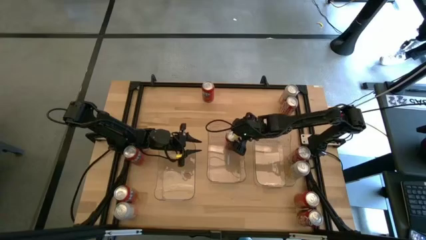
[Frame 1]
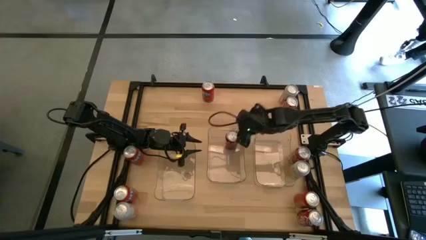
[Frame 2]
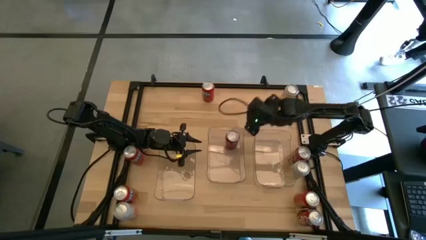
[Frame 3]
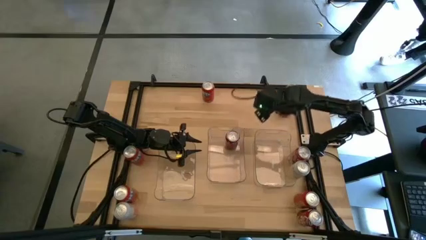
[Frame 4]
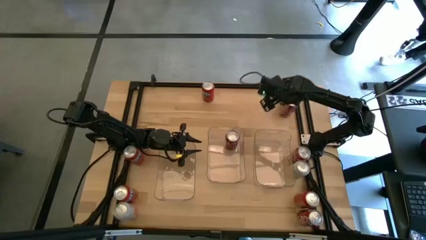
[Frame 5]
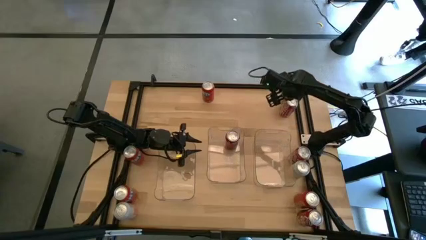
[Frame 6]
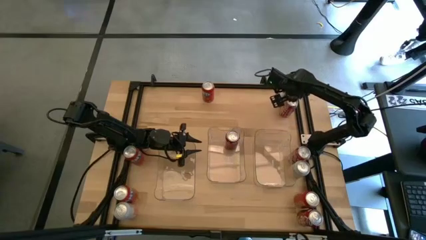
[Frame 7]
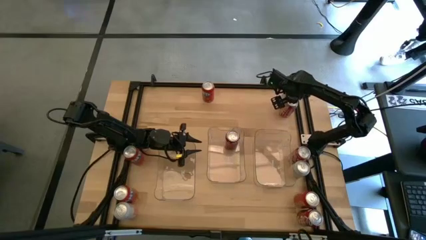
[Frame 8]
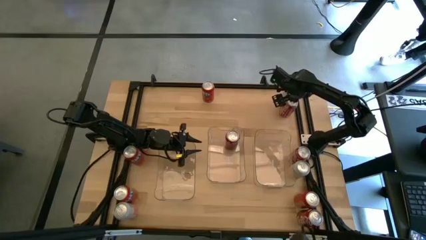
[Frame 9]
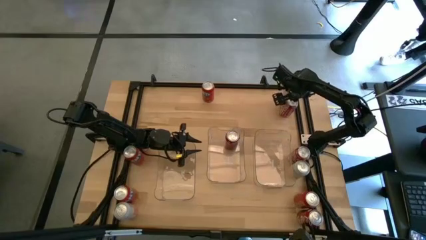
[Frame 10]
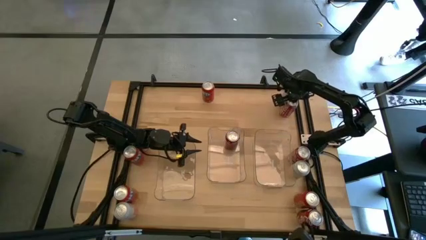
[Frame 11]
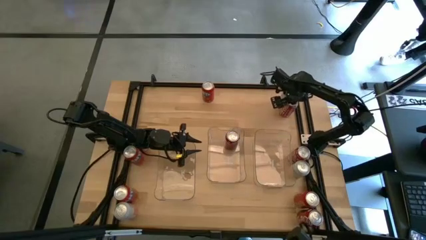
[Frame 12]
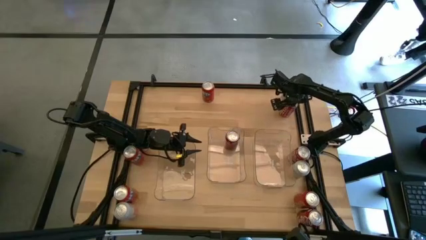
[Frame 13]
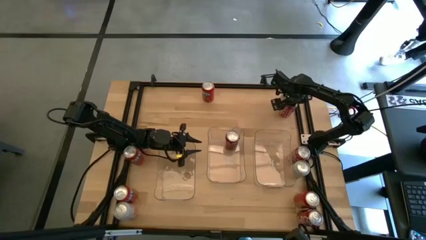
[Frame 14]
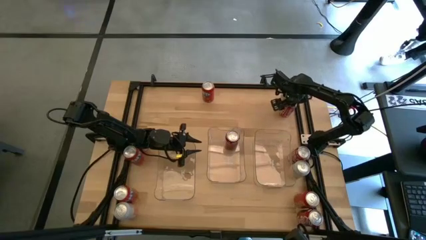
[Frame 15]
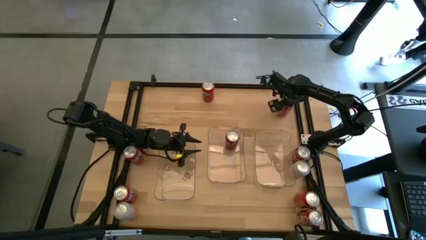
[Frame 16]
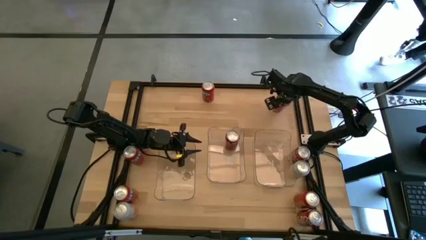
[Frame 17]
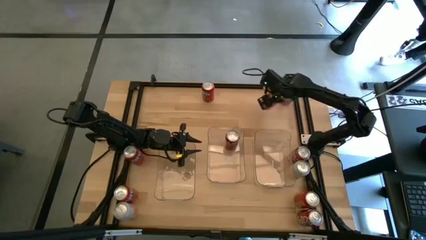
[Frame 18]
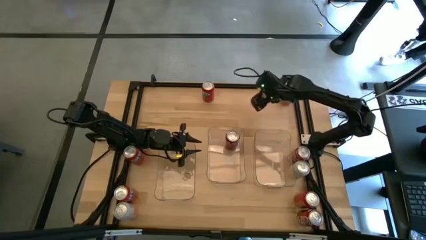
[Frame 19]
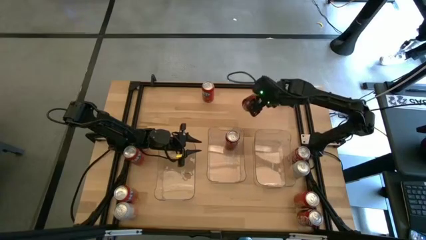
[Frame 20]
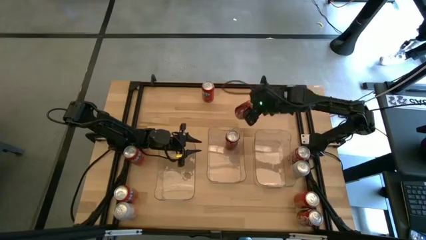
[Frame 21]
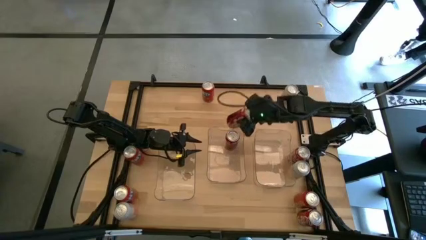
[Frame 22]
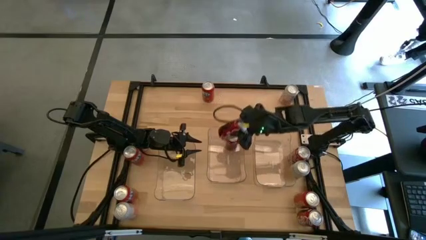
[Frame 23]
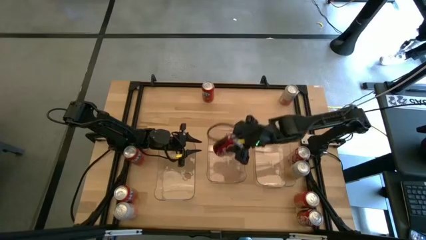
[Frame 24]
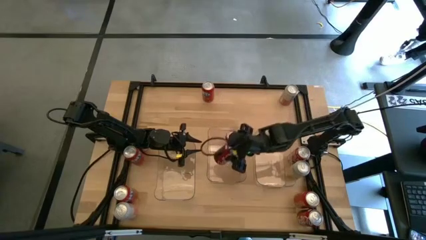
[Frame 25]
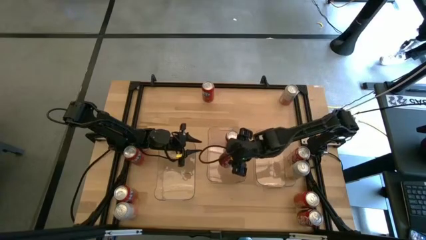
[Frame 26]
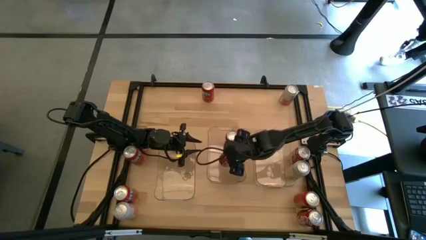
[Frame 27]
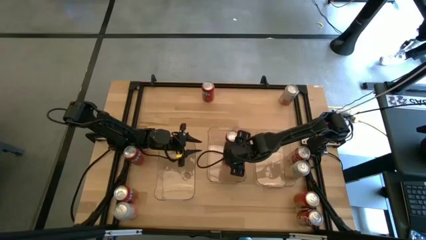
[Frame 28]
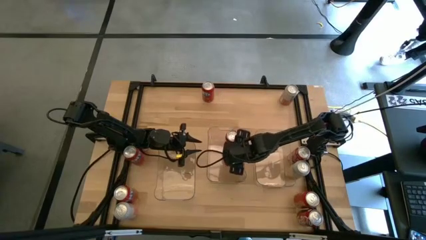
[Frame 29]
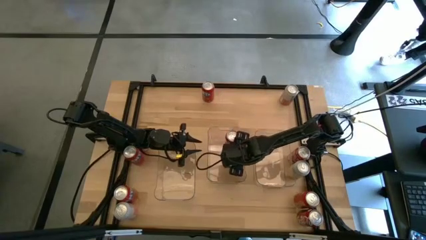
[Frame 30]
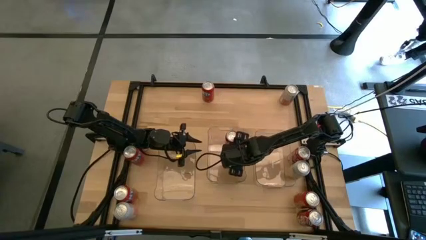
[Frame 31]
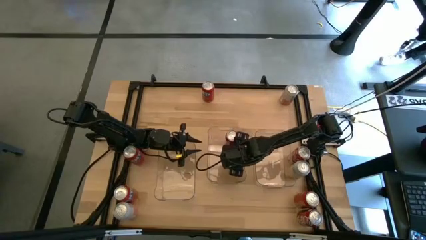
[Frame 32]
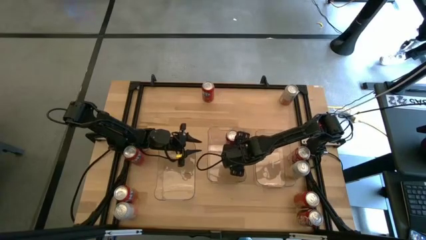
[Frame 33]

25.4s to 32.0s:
Task: Sort soda cans
Put the top right red white soda can into the center transparent bin

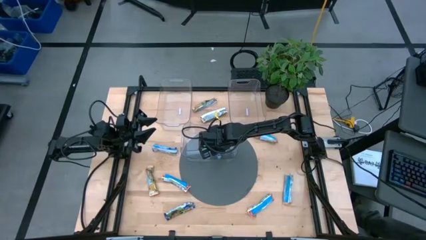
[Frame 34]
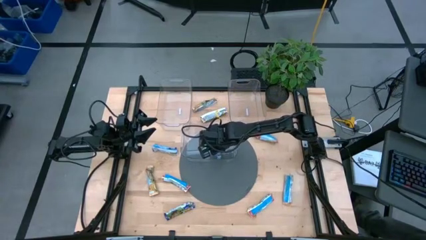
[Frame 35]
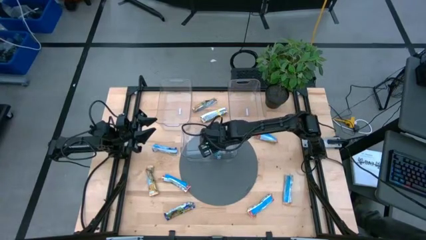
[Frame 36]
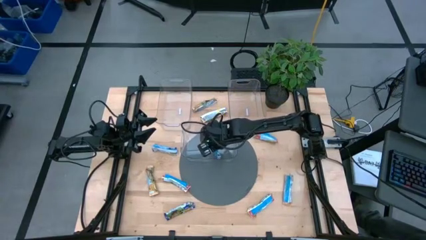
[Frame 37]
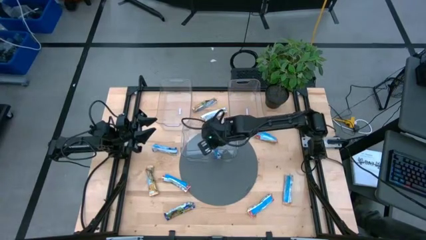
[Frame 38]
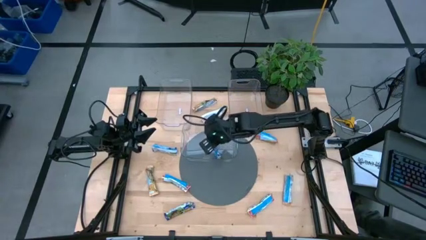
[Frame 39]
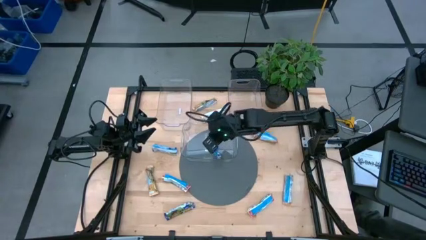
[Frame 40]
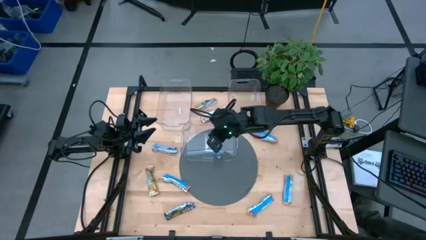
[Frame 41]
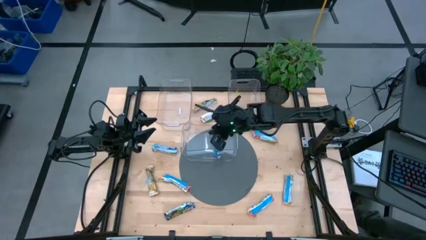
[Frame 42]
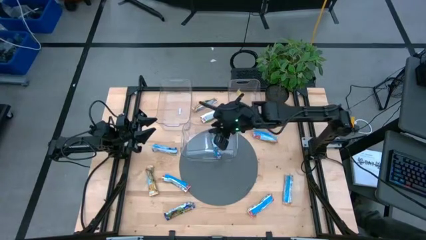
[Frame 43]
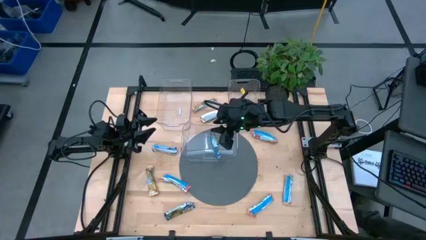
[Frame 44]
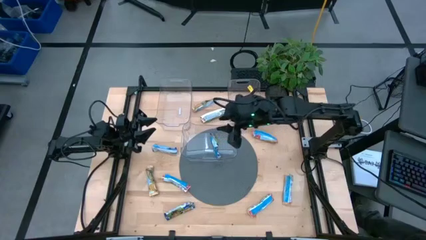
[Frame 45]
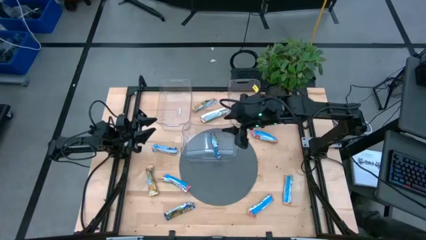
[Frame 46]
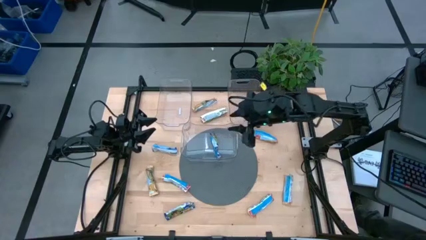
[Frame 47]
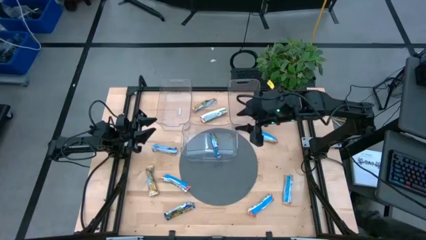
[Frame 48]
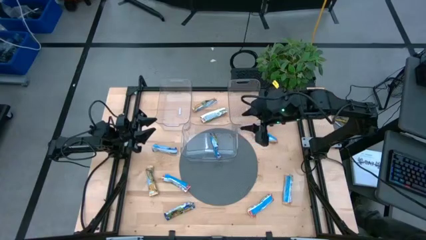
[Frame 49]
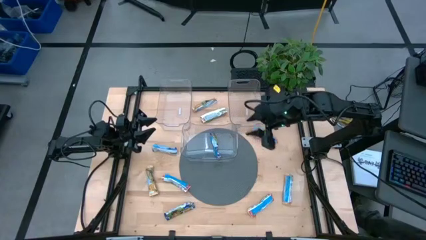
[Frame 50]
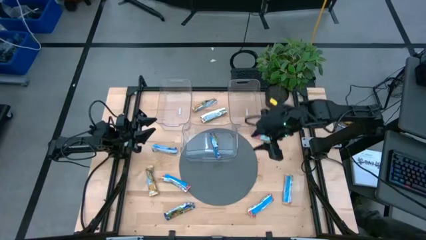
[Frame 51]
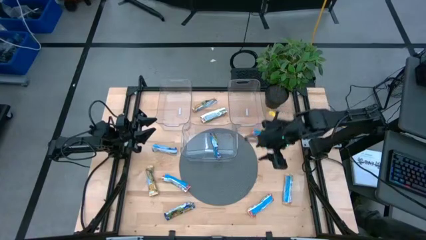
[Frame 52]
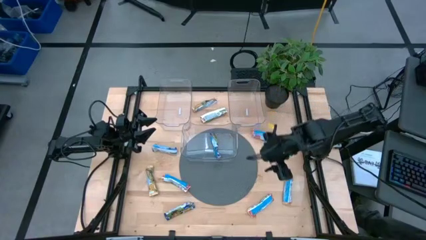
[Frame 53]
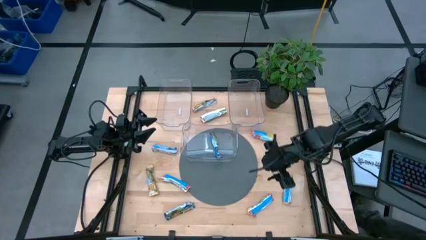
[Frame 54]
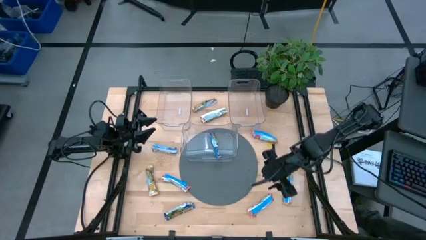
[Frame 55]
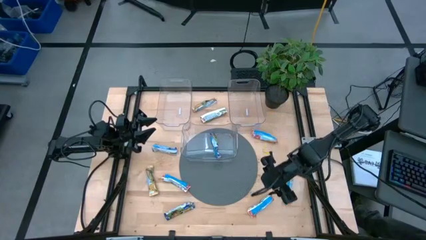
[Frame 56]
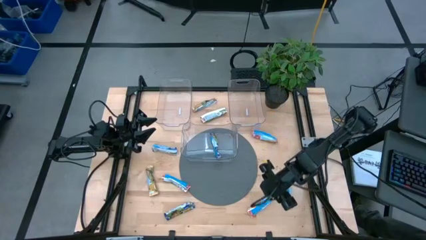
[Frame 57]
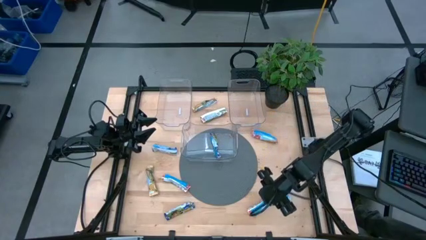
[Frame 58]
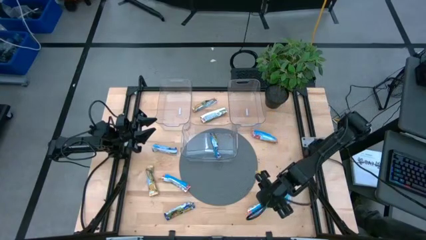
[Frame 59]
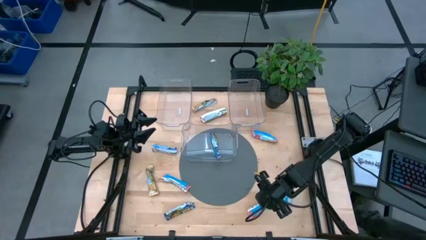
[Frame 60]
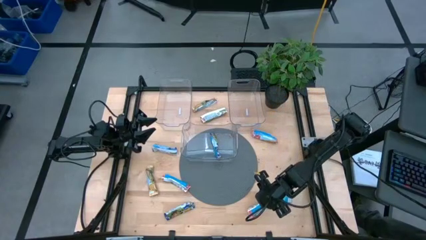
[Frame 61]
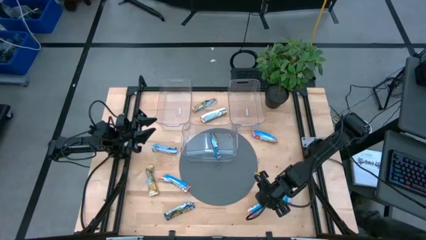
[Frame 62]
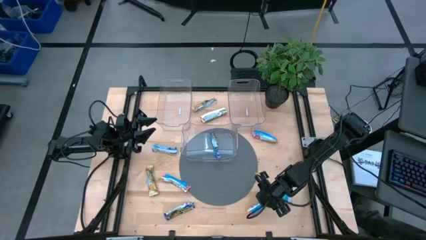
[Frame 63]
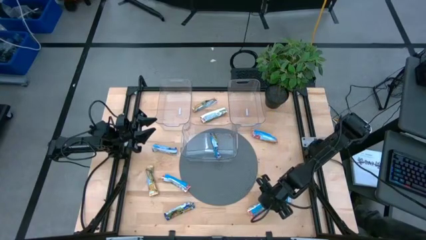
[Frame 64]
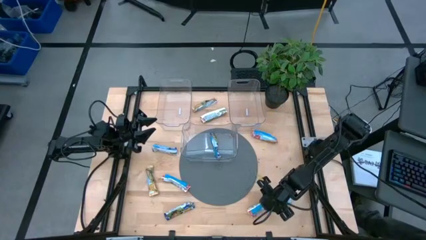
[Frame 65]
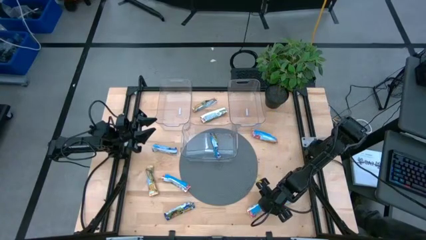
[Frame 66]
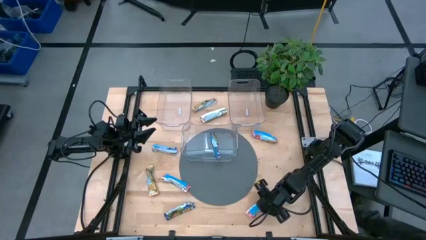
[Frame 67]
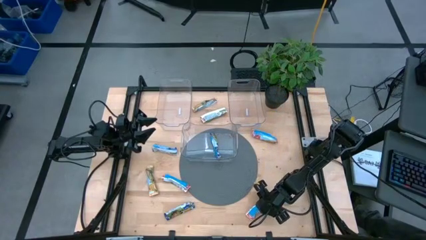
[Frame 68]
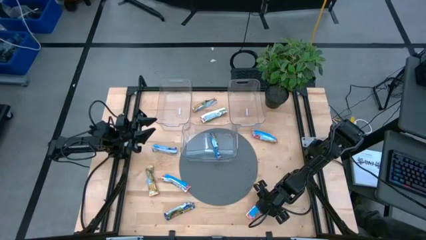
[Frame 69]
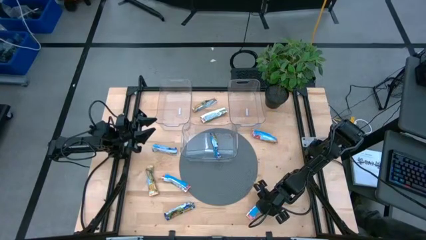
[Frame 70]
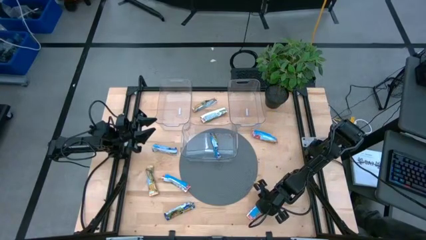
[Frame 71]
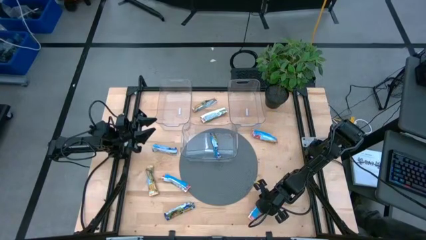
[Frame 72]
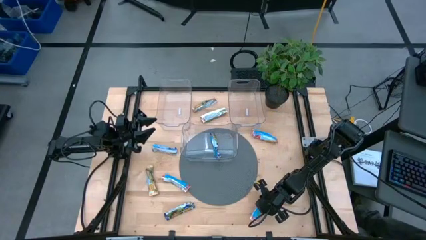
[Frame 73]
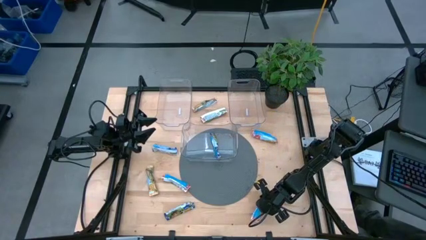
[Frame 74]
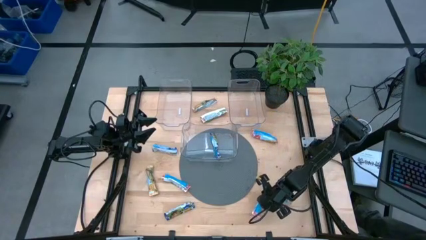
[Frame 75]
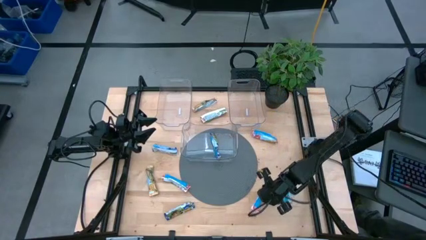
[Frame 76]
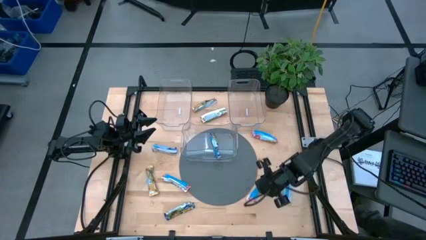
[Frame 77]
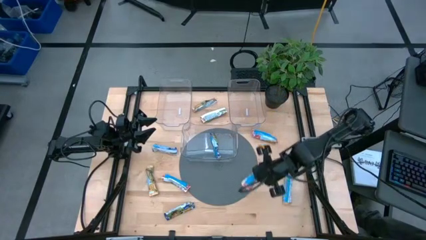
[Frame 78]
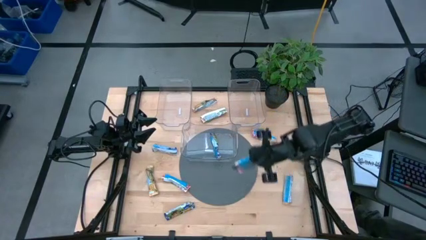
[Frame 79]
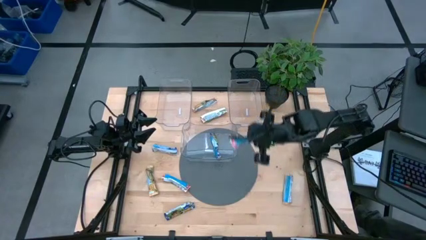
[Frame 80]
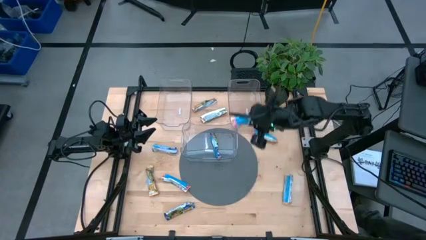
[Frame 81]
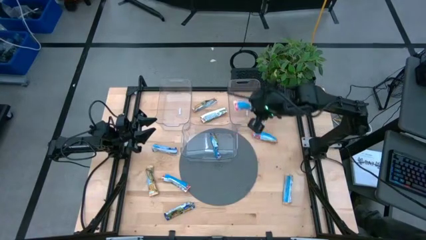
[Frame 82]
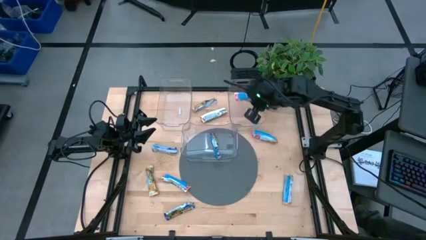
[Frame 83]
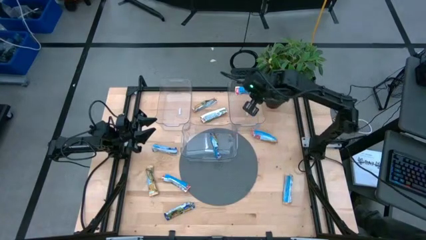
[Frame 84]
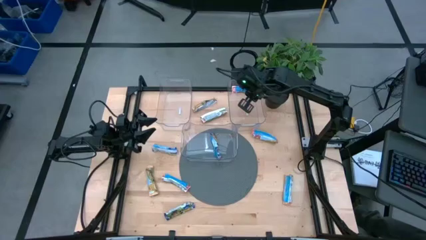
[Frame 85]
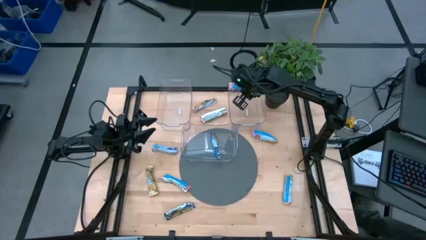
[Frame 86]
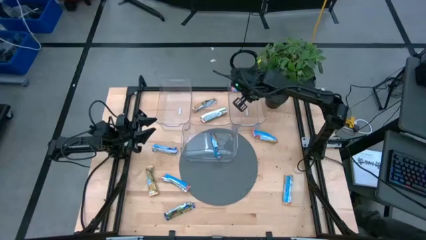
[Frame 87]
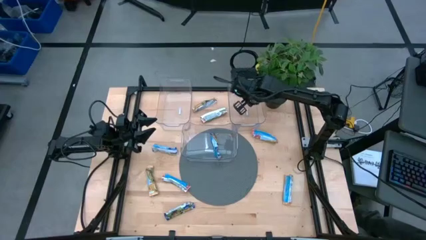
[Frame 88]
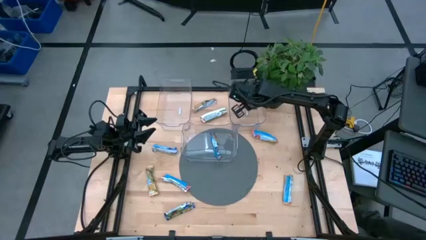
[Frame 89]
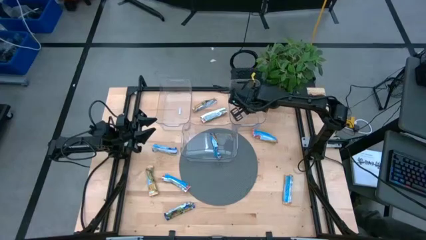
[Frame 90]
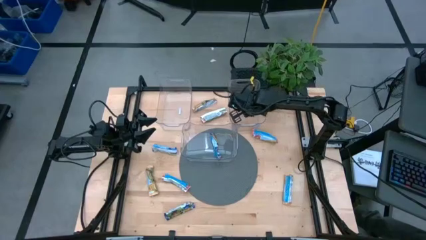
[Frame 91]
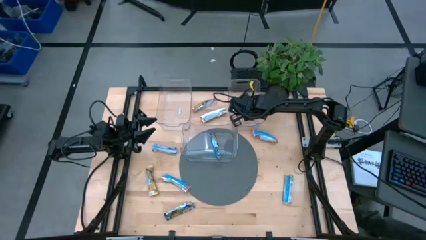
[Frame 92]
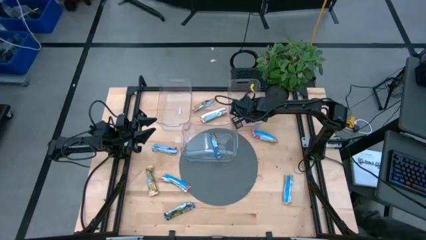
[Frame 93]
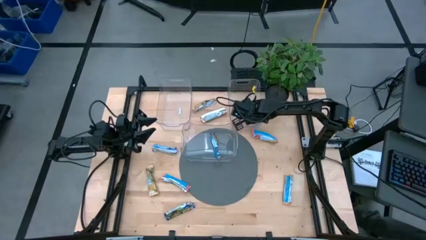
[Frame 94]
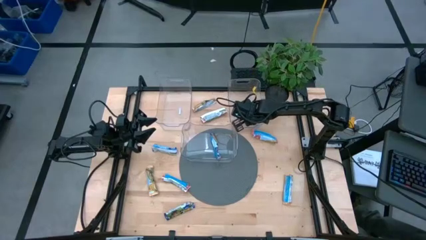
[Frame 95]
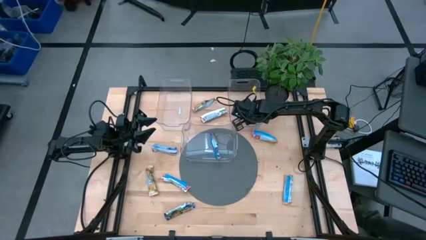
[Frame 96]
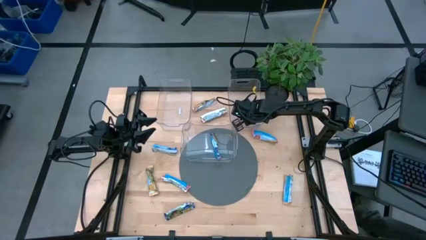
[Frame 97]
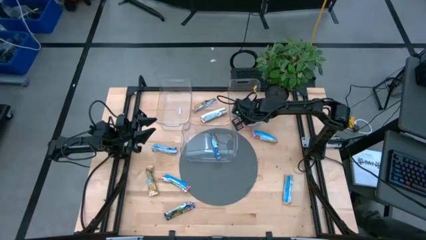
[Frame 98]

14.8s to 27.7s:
Task: Pick and place Granola Bars by type
Put the red granola bar into the top right transparent bin
